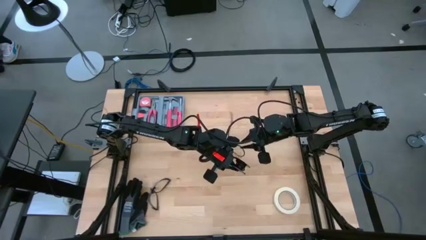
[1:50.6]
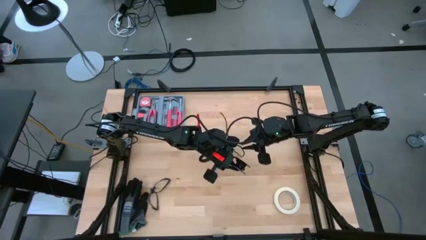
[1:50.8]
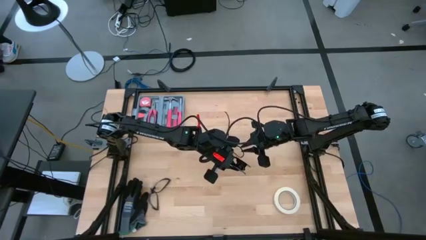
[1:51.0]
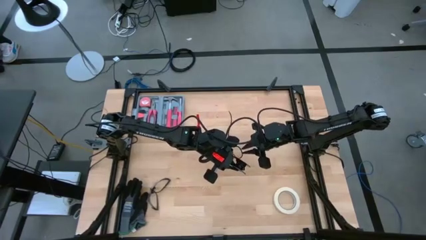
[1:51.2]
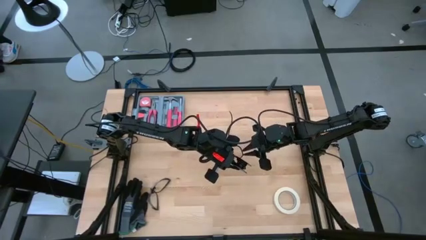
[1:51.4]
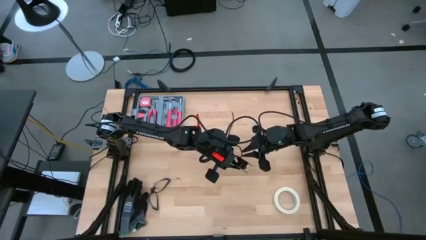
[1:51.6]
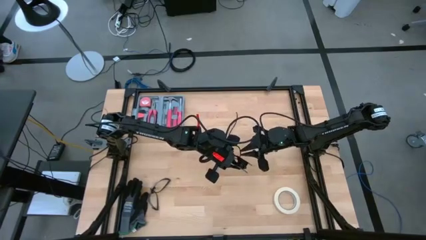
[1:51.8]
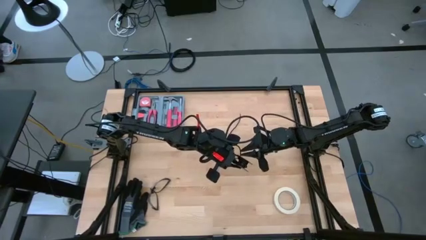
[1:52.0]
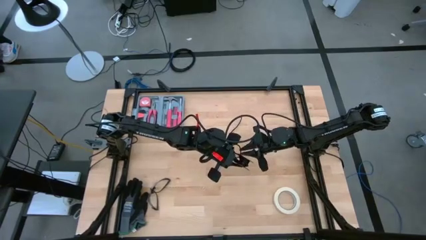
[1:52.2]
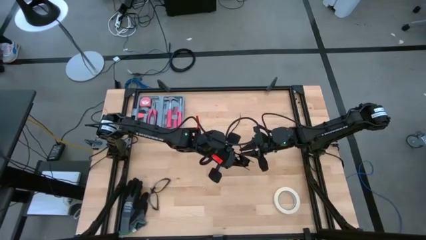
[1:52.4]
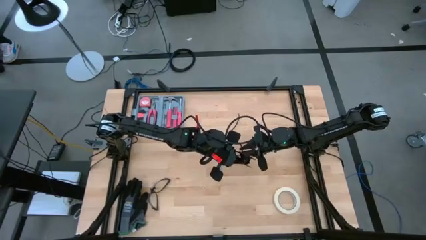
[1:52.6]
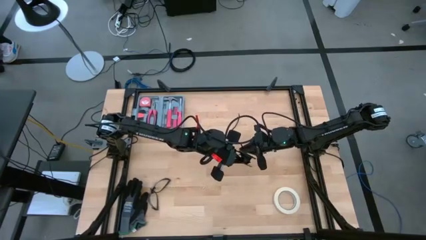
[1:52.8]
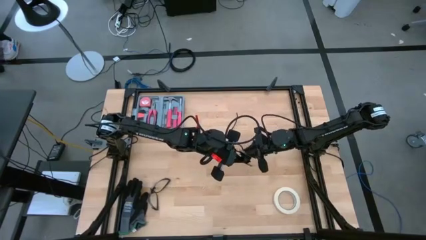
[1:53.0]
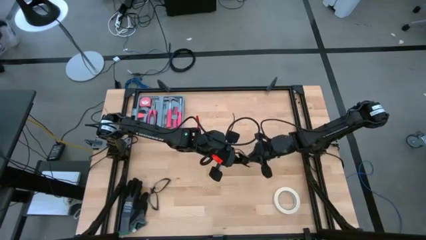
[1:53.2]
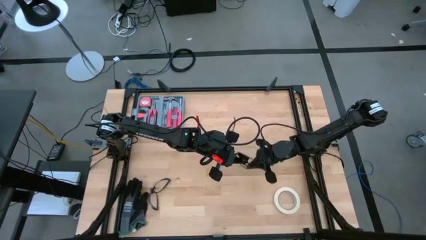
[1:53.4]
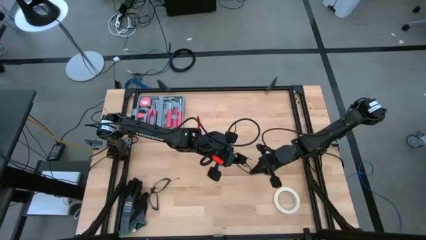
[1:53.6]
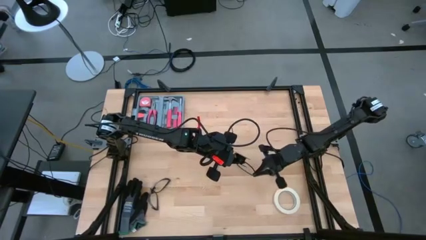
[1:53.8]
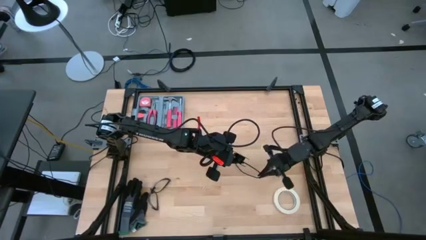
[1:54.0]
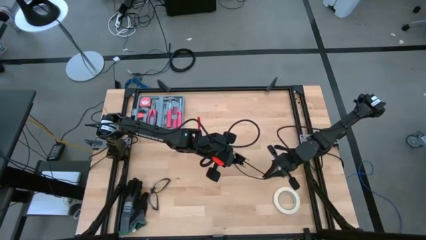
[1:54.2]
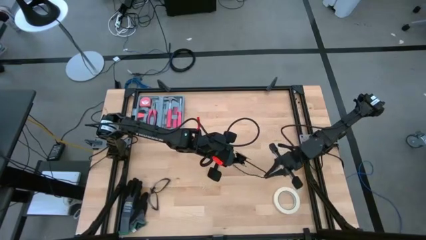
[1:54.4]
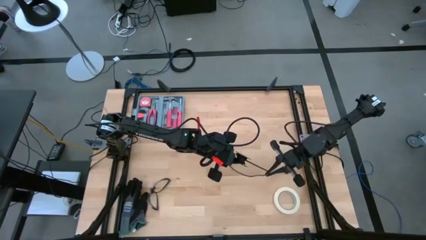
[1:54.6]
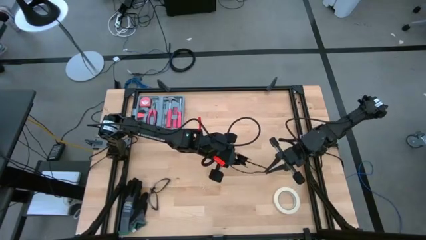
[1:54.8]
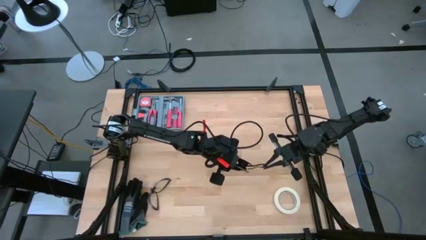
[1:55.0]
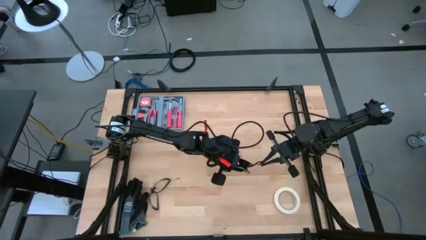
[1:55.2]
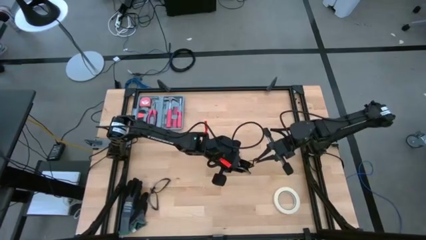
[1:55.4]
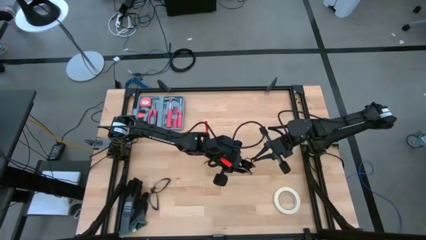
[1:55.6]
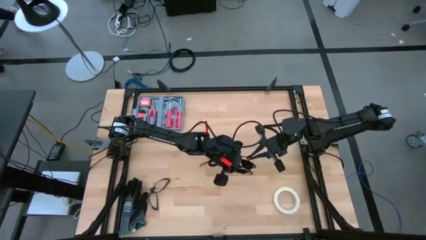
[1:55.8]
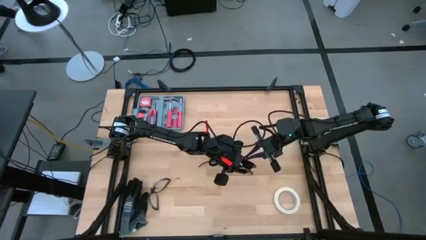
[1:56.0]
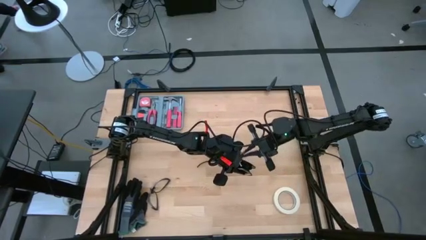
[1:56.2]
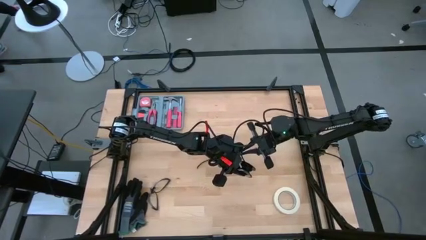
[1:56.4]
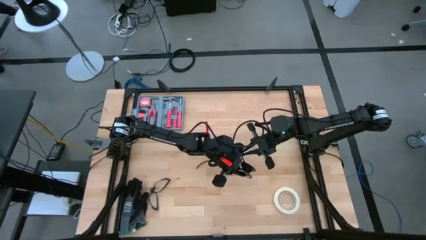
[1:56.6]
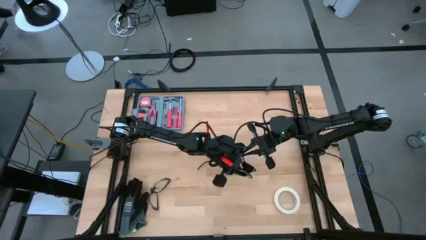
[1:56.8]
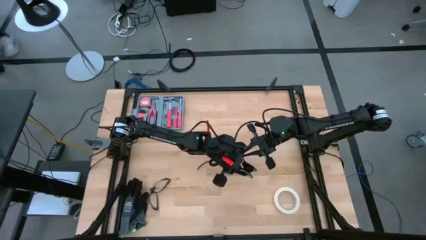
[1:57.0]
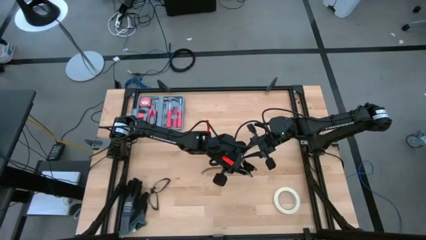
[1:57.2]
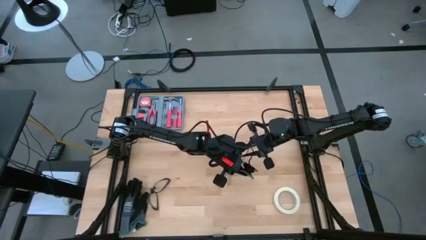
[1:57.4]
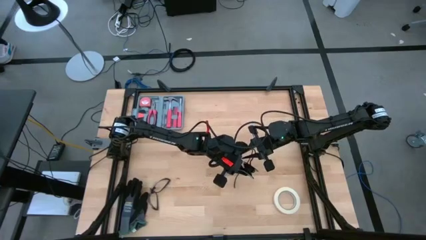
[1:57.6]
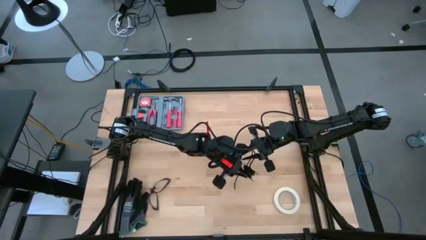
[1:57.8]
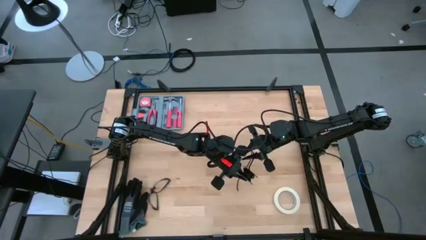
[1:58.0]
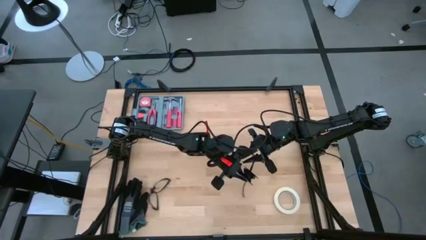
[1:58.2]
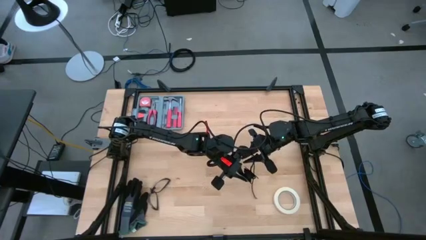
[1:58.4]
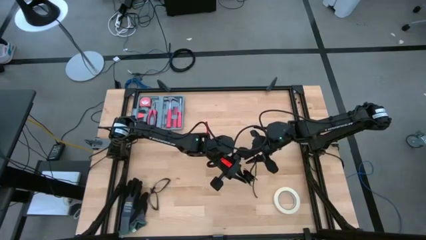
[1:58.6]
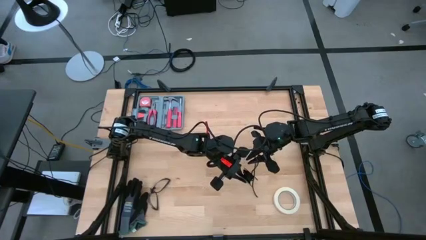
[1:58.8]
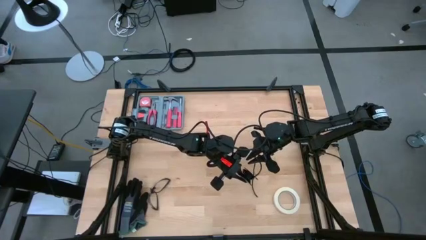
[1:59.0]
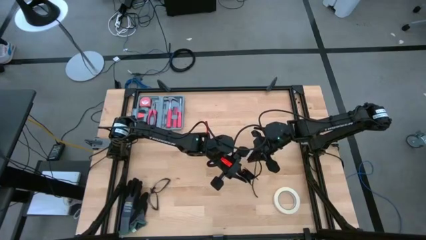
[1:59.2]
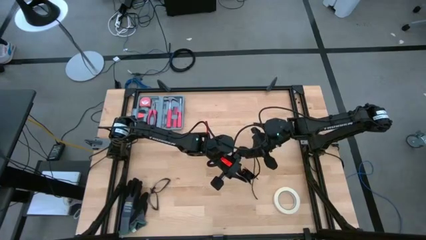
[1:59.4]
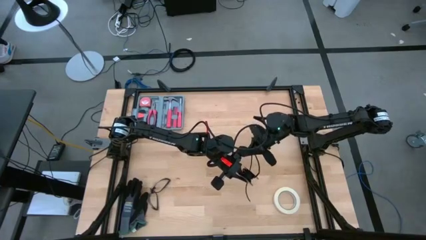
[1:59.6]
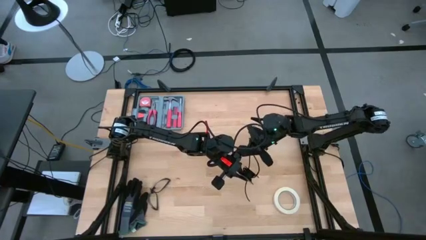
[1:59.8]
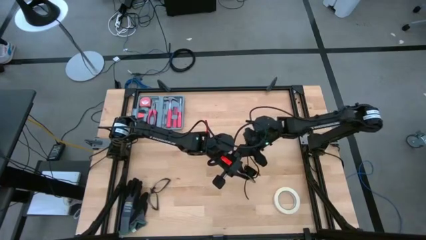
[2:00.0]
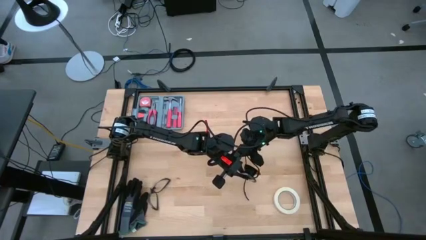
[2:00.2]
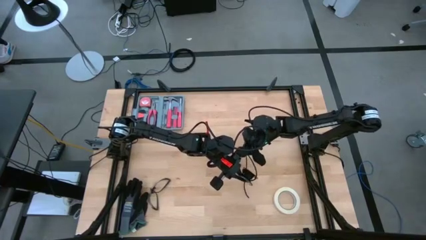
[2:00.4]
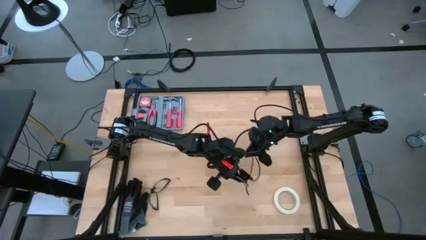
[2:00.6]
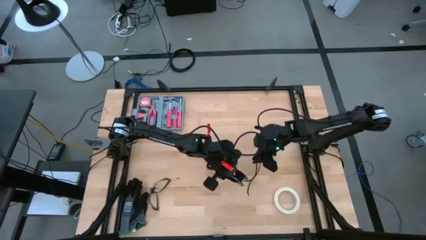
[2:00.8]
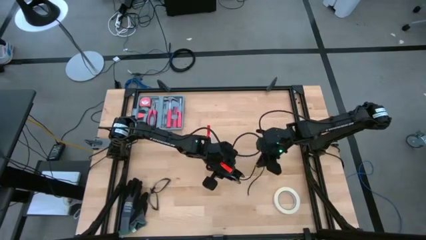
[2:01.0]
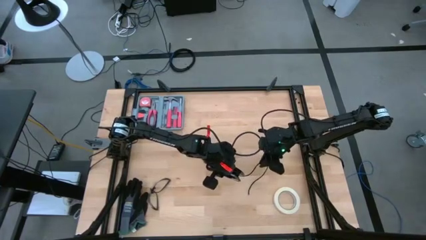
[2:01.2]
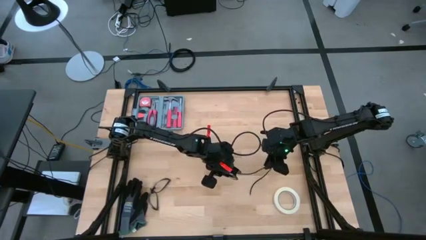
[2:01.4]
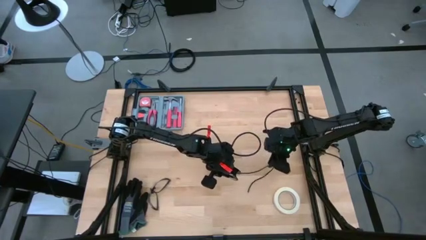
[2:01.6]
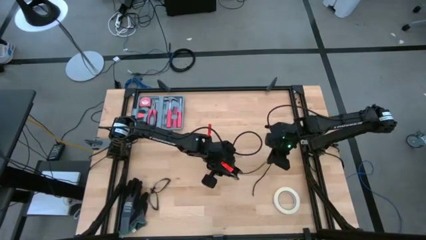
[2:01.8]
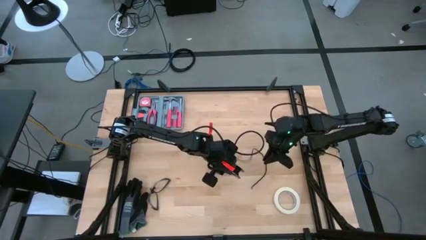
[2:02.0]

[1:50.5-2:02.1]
Task: Coil cords
Coil the black wire onto the spool
